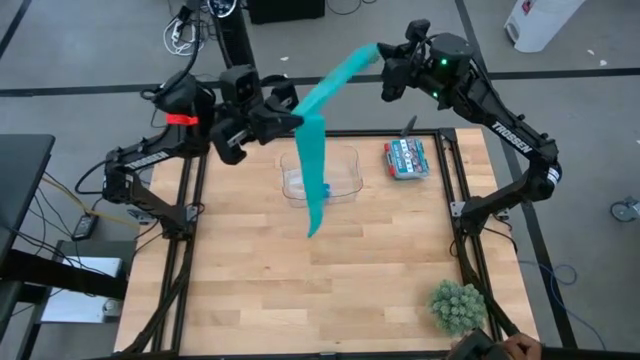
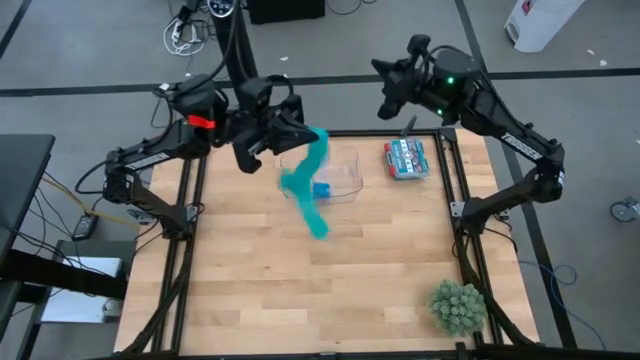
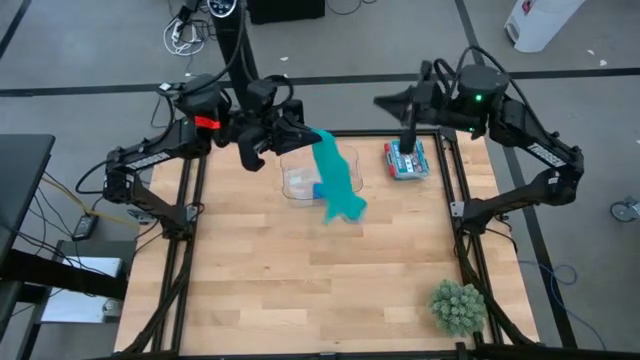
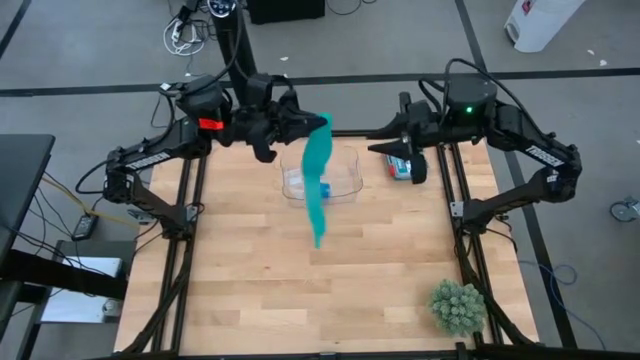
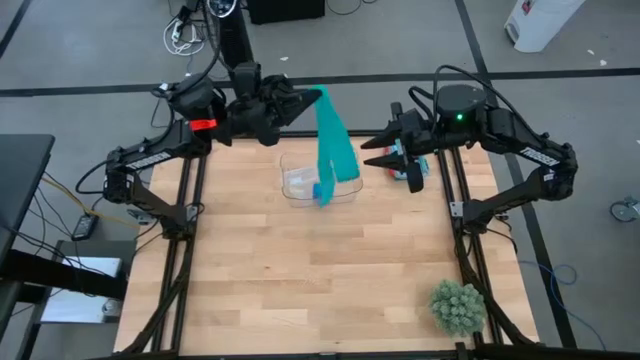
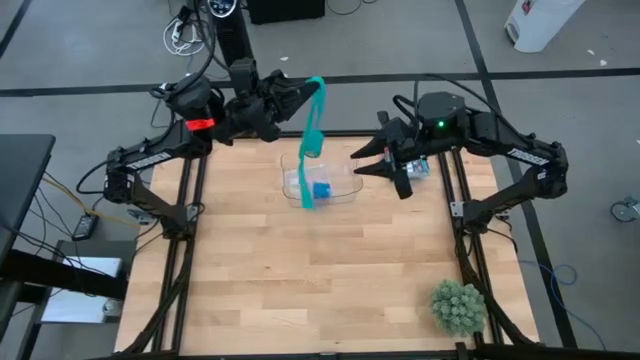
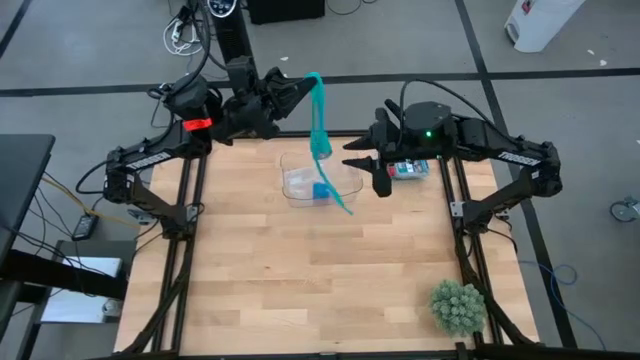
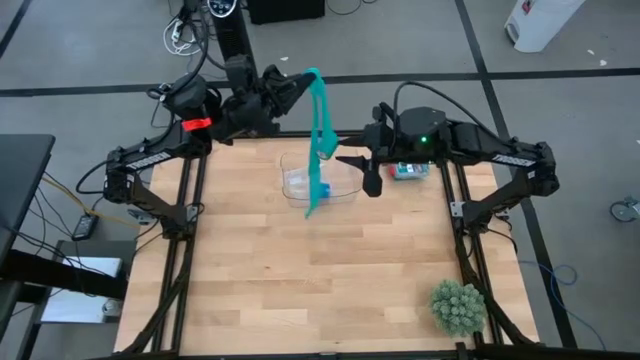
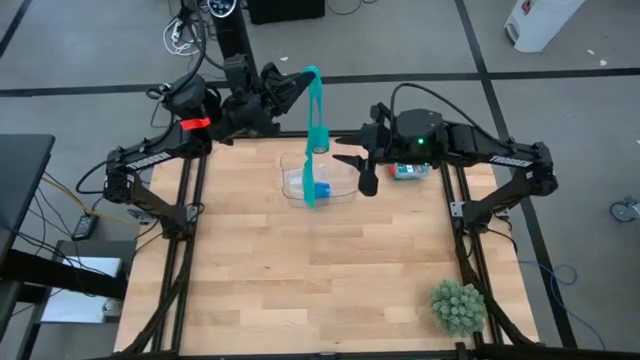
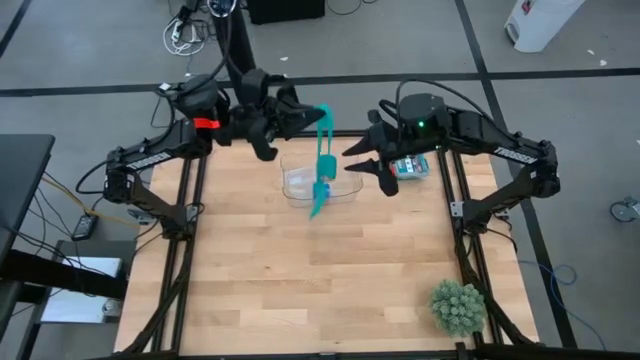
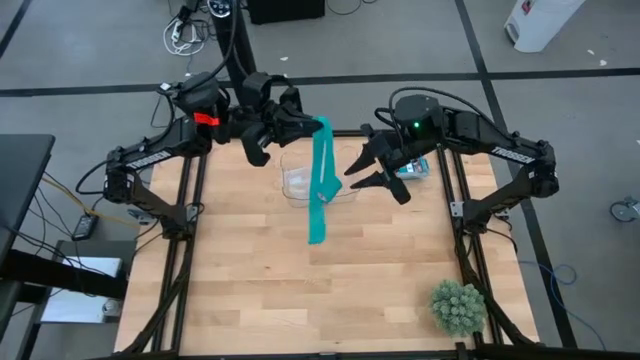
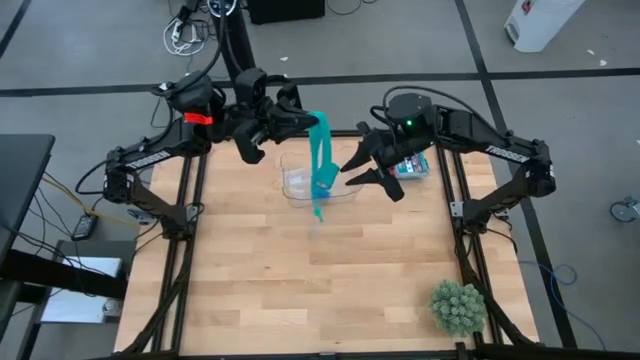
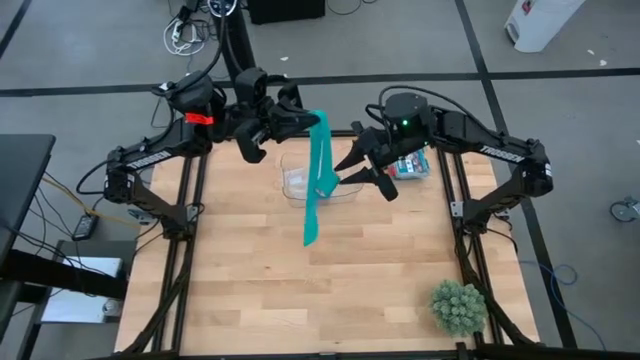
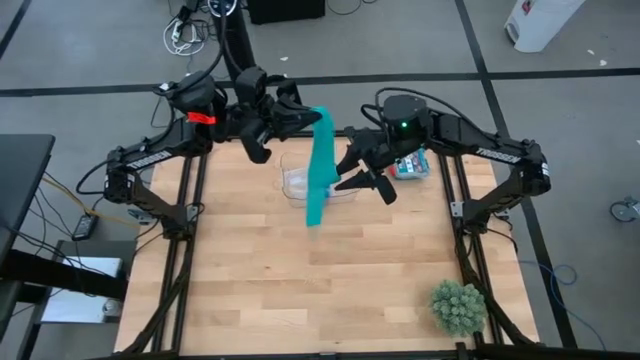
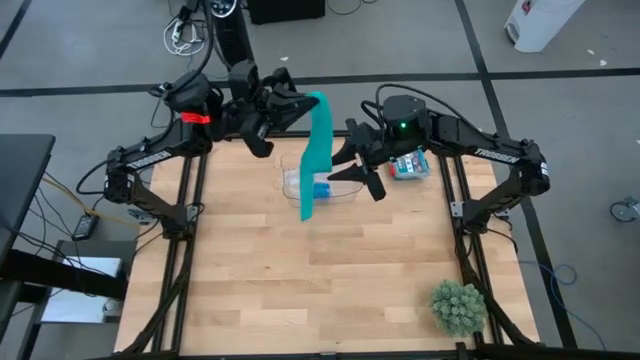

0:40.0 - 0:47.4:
Task: Roll bandage
Roll the sky blue bandage

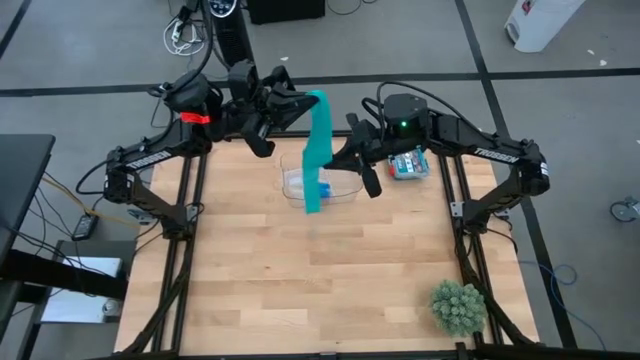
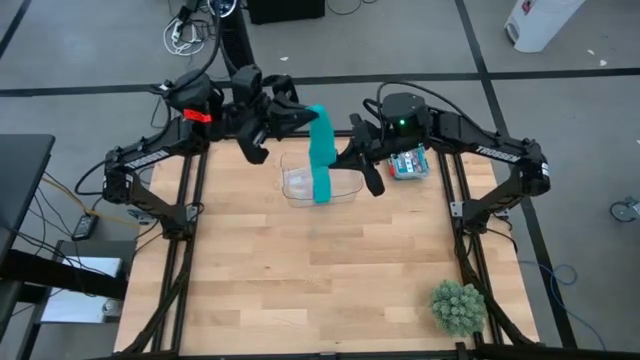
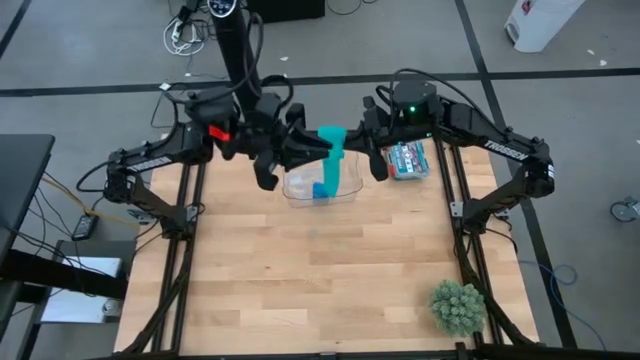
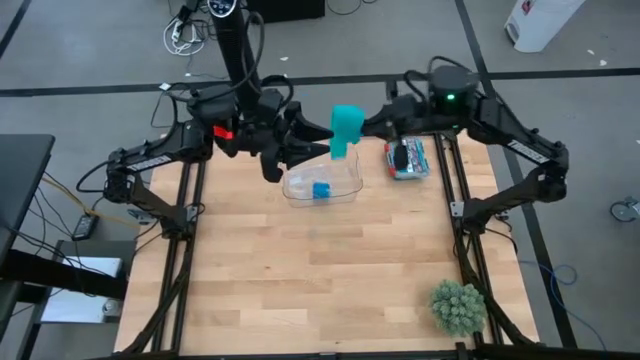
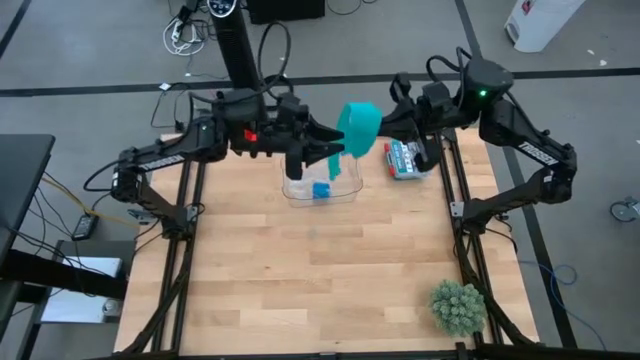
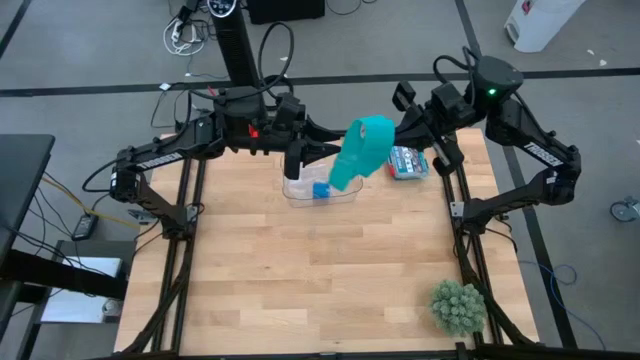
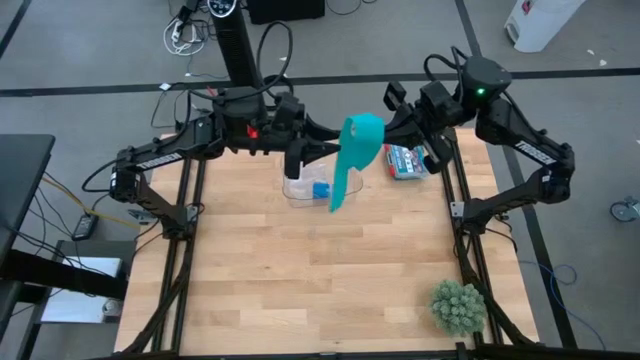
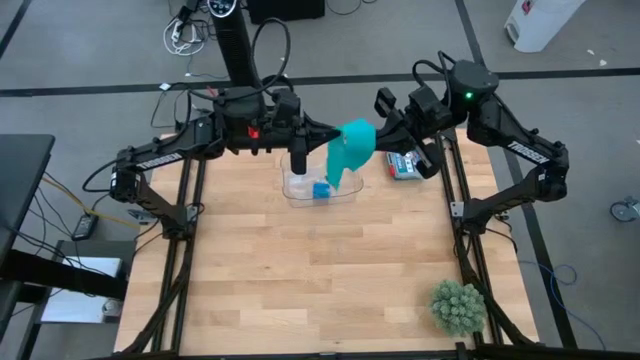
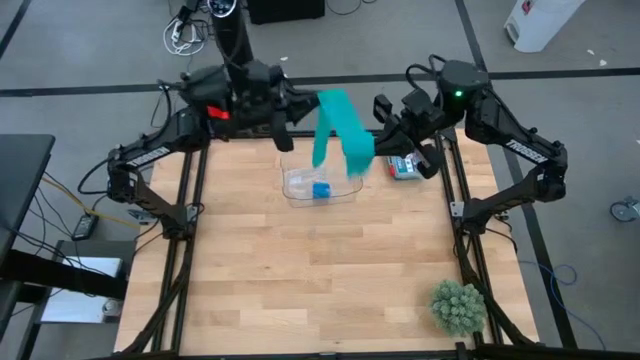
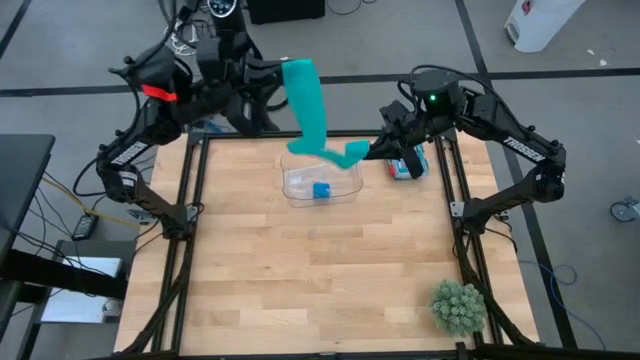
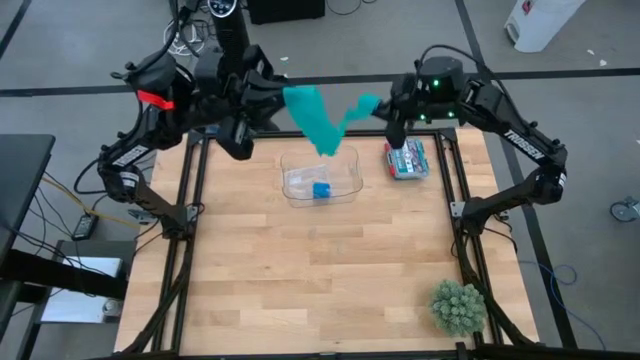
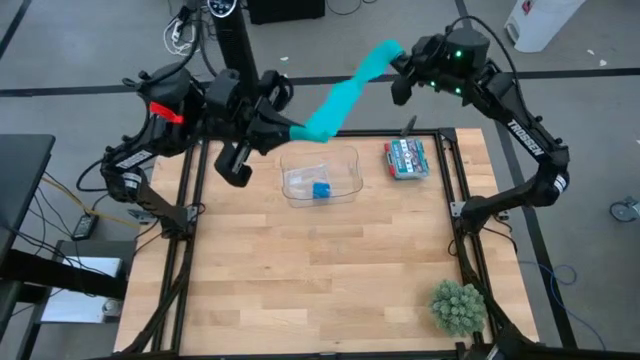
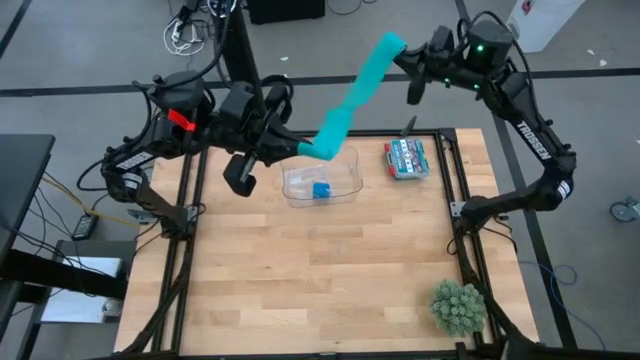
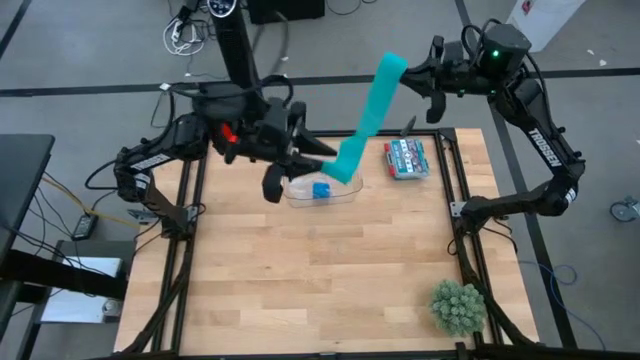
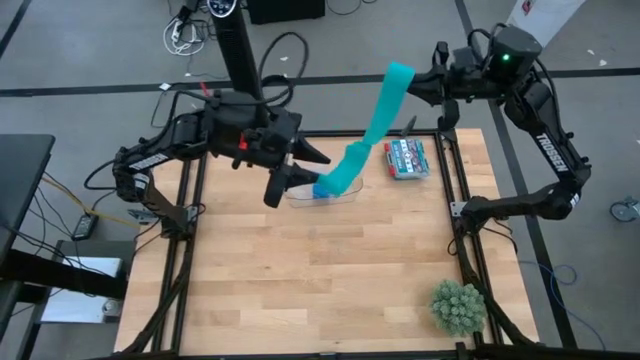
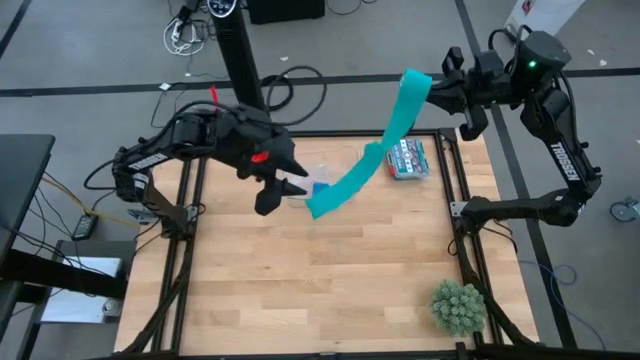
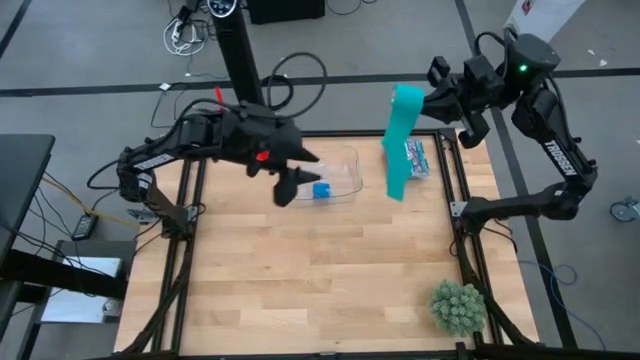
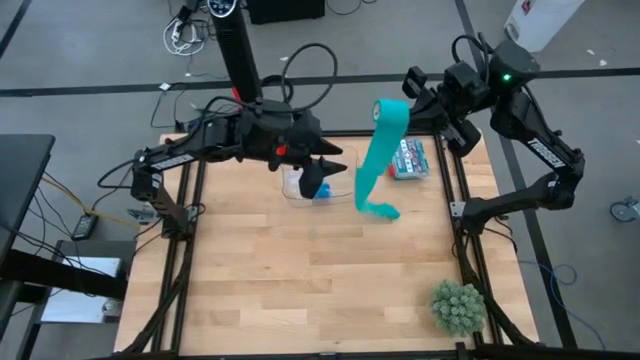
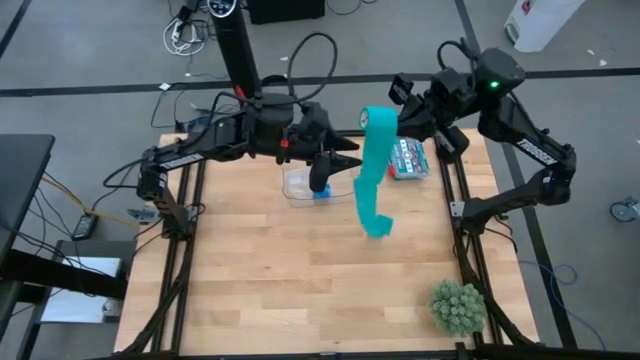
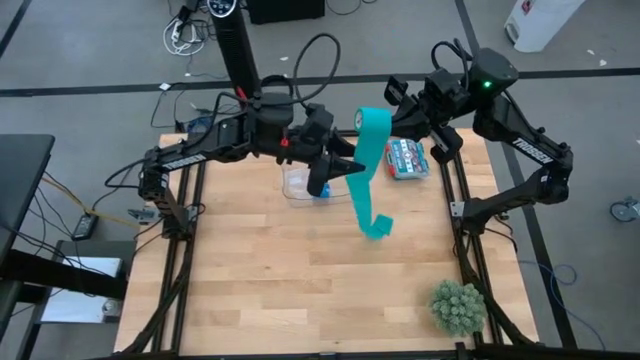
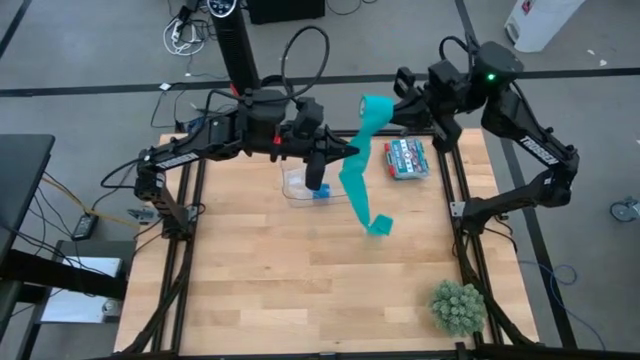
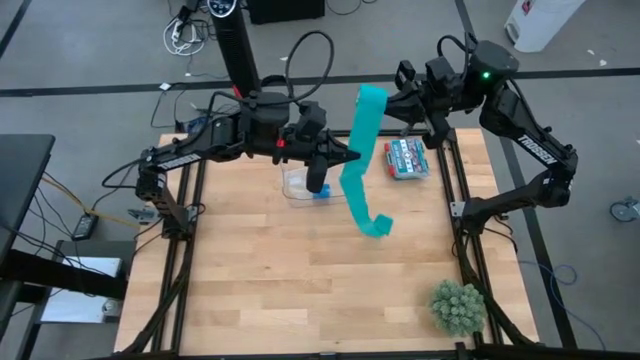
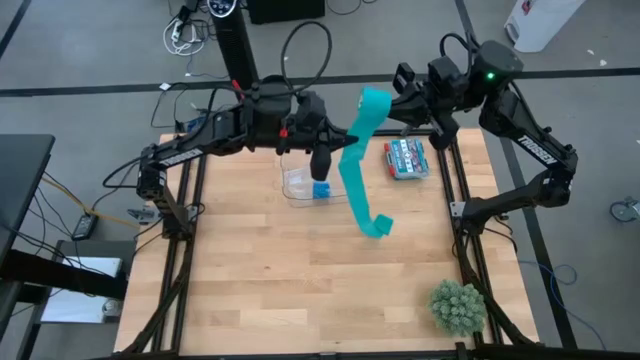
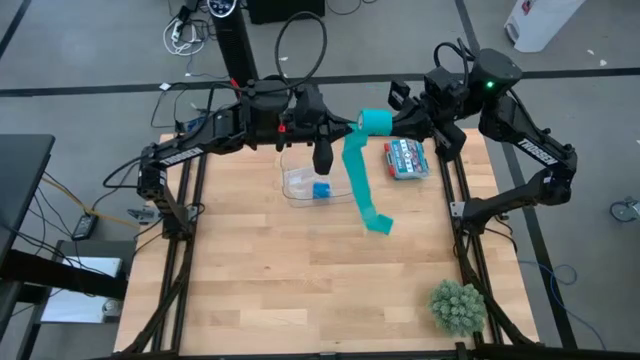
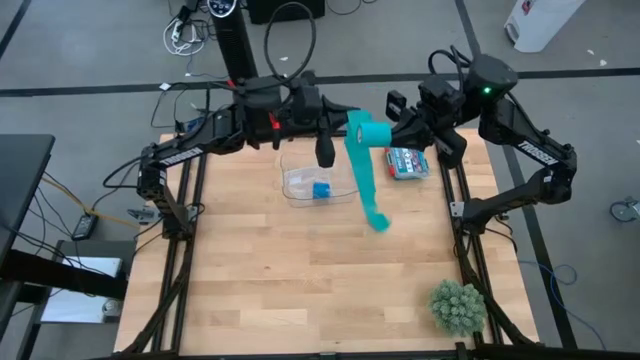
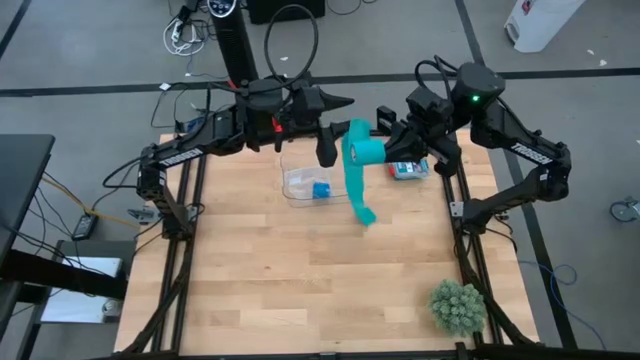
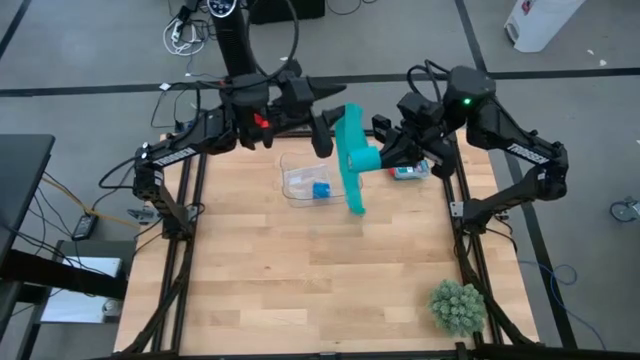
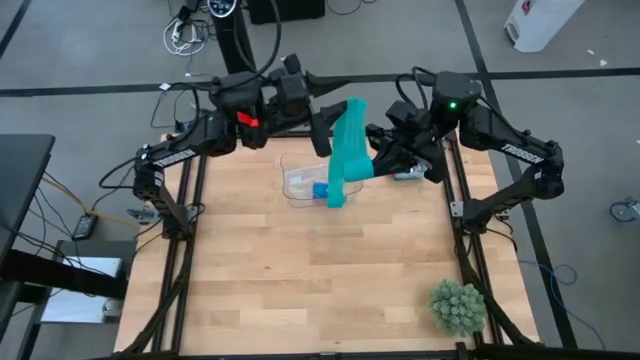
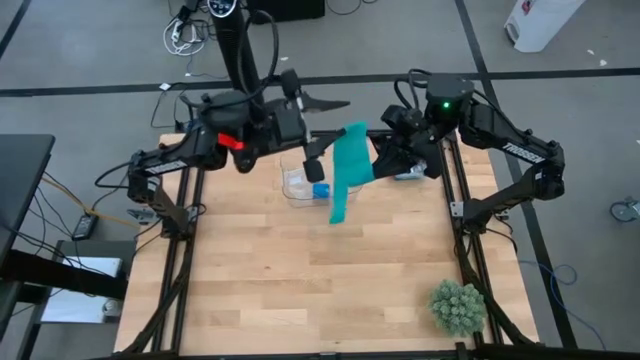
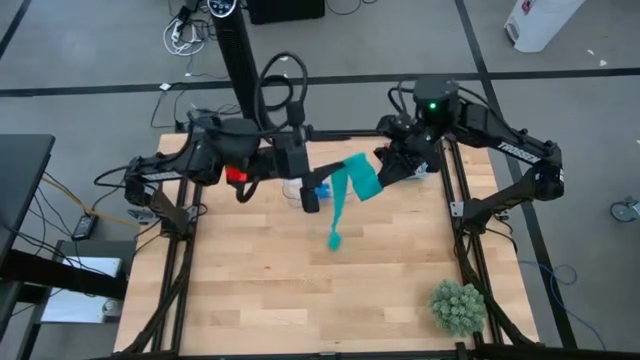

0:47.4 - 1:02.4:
Roll the sky blue bandage

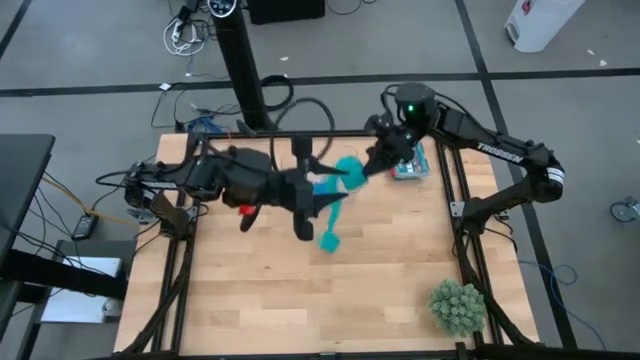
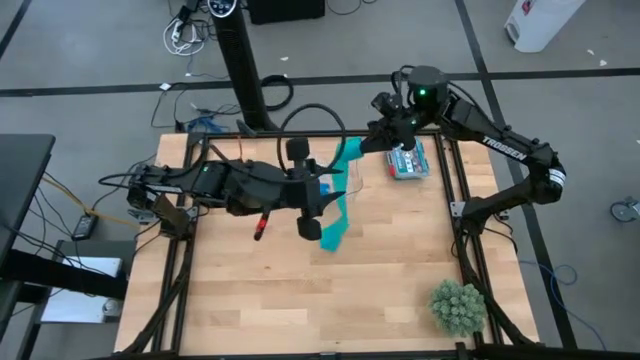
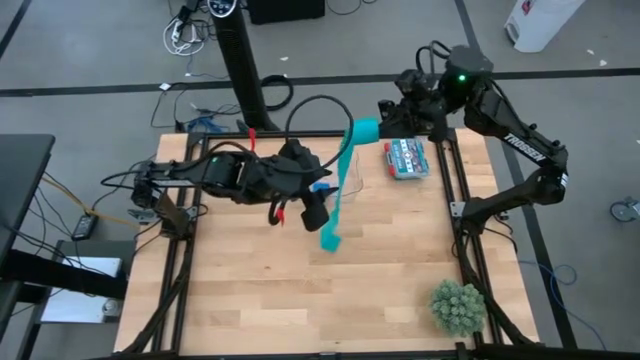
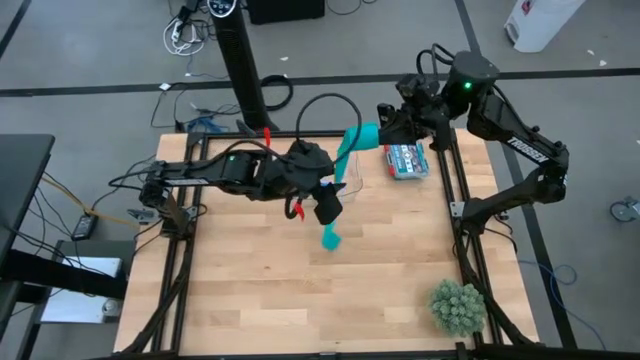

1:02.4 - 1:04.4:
Roll the sky blue bandage
